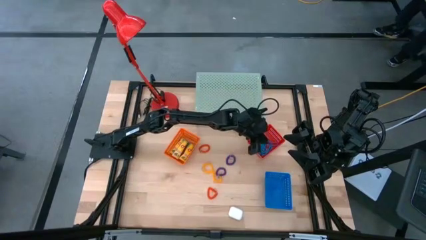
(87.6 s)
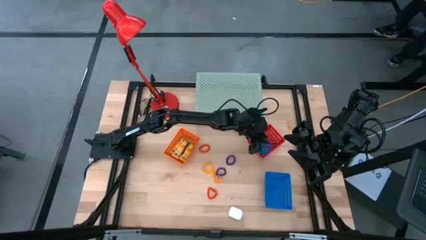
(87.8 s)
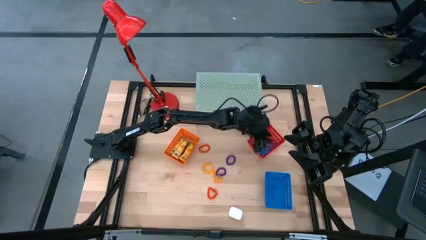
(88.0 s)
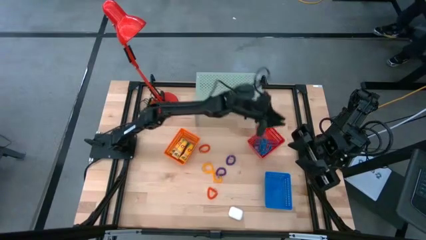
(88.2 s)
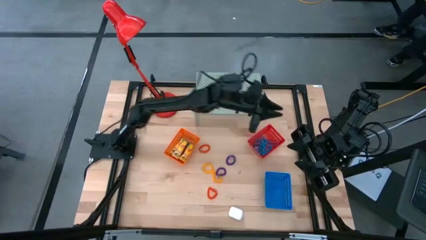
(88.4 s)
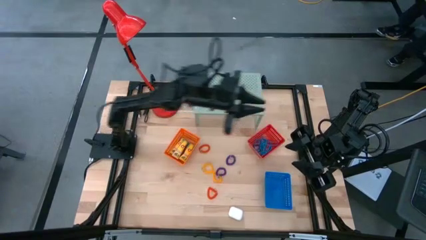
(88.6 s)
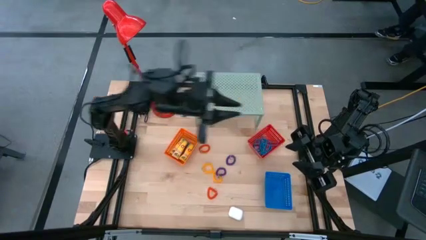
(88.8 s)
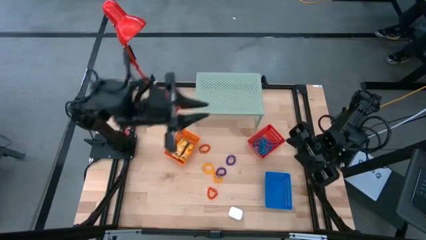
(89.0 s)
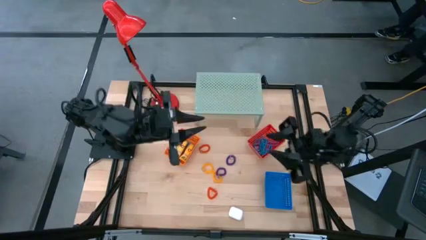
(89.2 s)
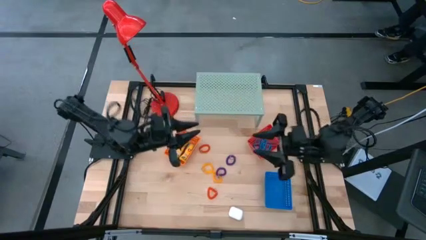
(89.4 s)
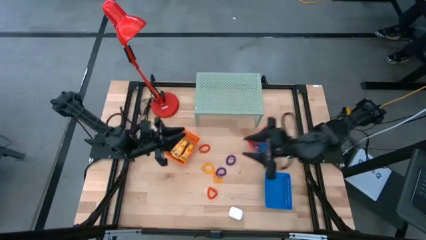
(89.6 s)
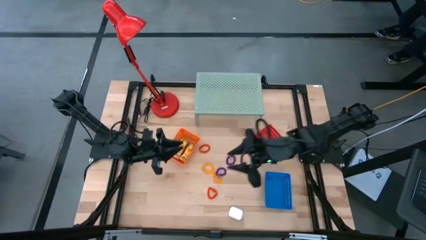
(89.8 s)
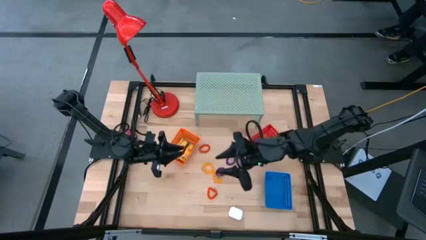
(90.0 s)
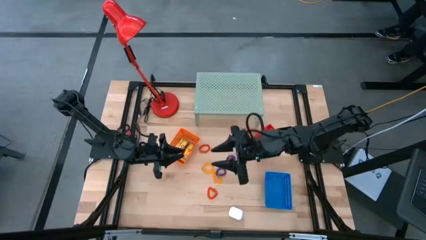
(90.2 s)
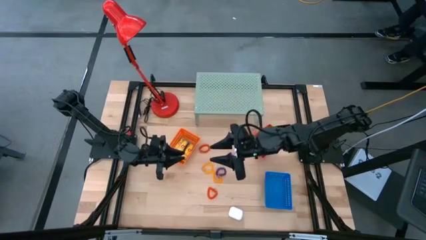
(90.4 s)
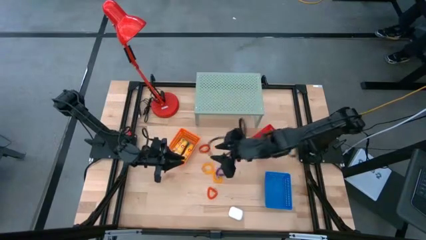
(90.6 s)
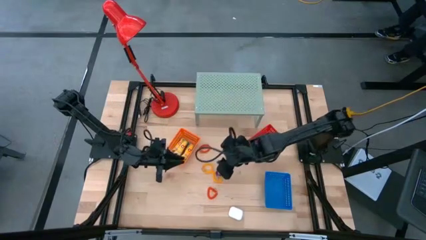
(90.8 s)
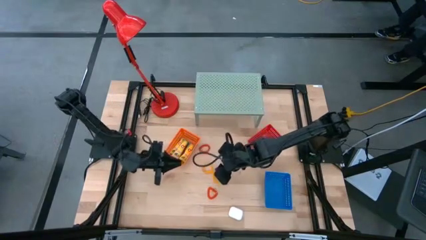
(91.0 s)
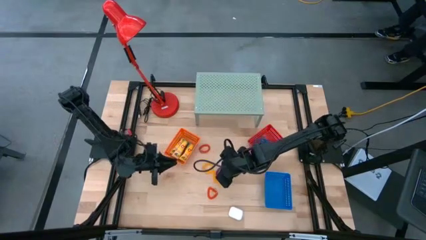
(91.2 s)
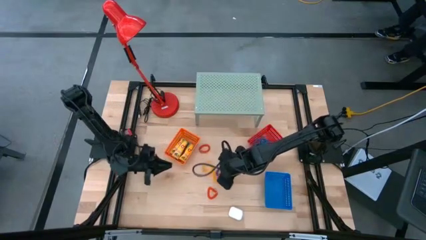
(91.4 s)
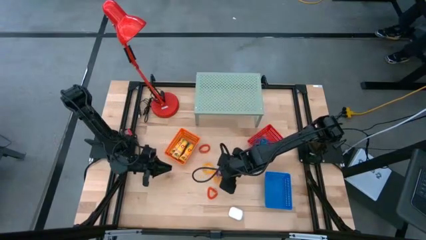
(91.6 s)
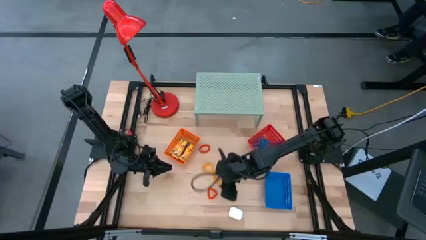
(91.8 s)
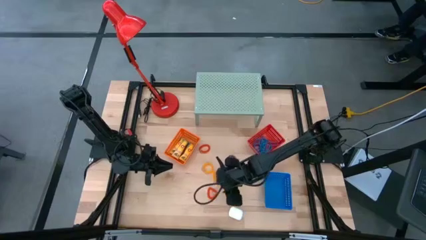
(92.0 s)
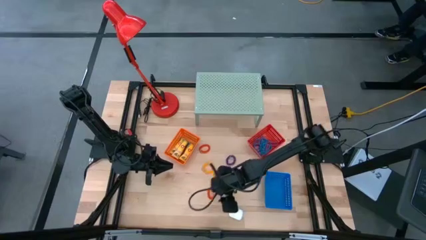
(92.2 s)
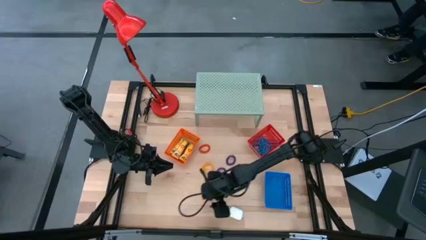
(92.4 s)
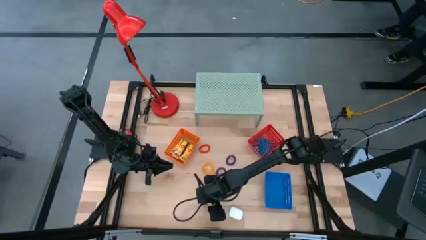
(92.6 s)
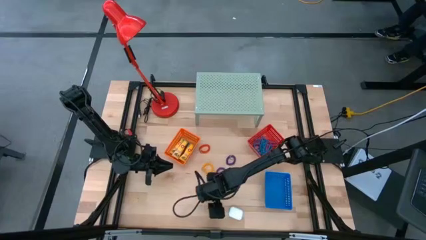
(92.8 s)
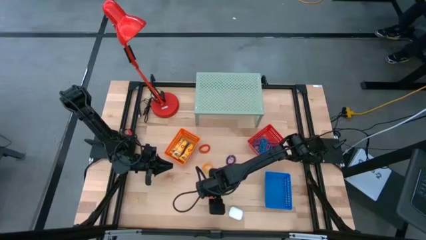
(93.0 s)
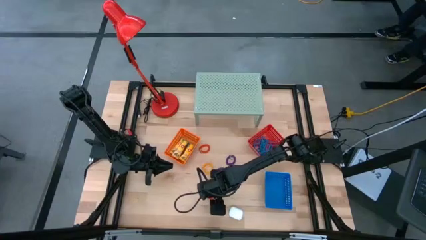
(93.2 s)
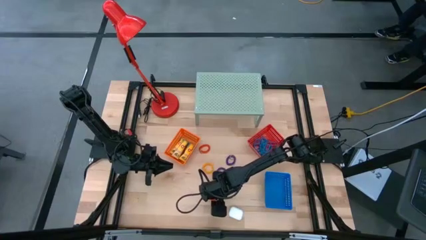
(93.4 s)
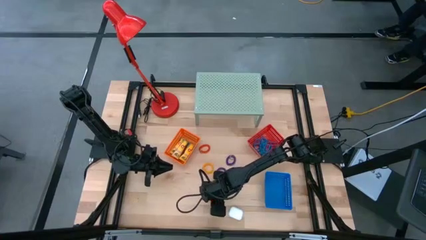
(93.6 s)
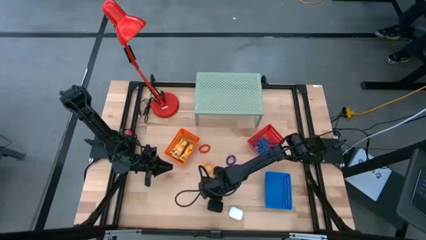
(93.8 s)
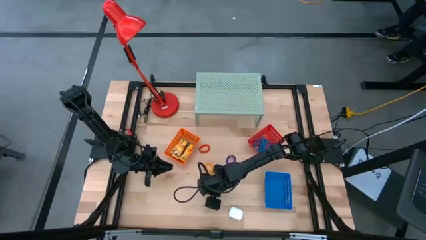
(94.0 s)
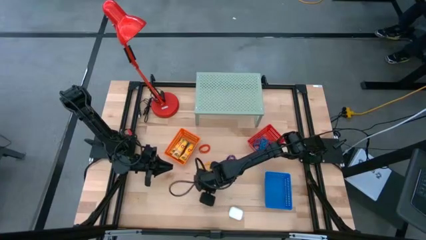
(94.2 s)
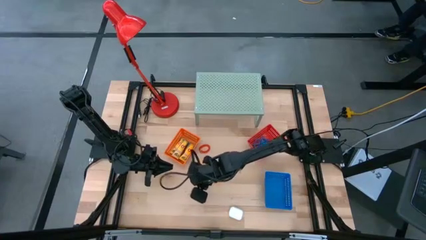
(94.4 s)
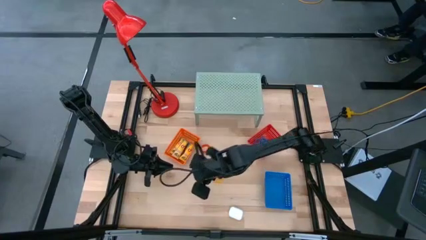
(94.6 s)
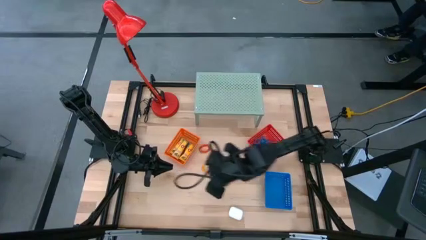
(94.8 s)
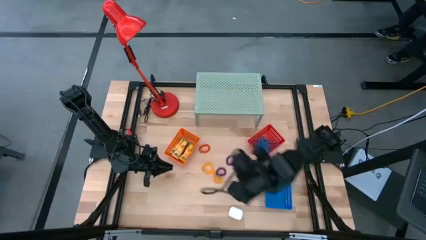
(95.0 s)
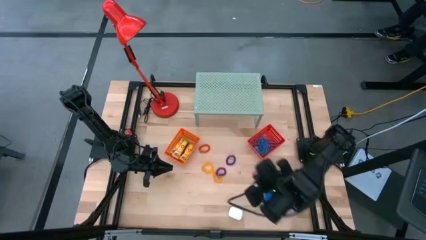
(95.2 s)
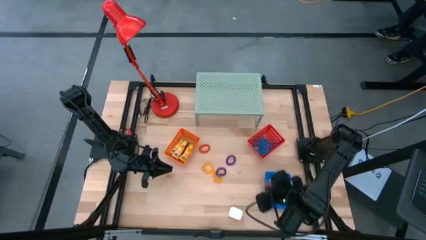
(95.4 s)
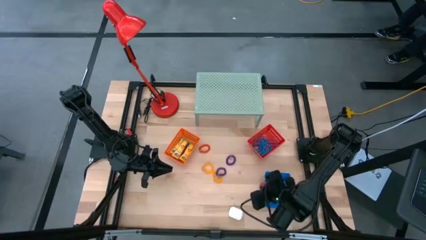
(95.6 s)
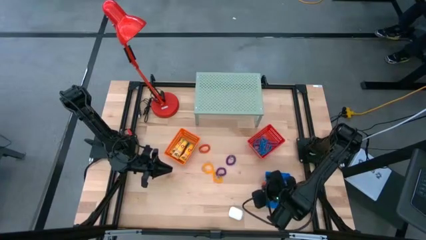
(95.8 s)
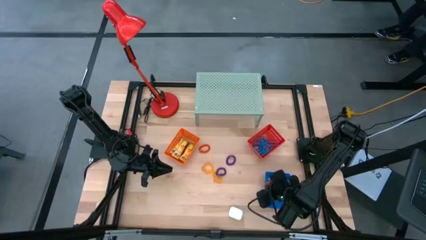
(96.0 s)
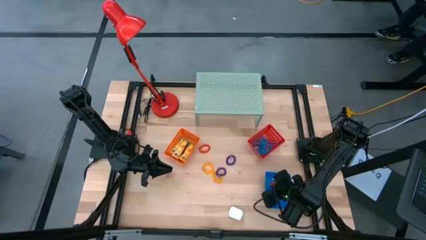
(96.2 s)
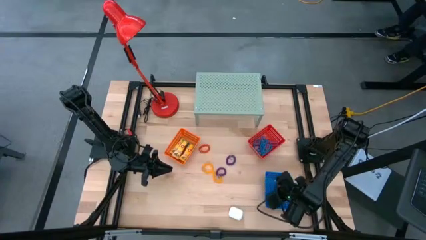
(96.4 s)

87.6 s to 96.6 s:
Task: Pick & Place Office Desk Supplies
Put the orange spring keychain into the blue bin

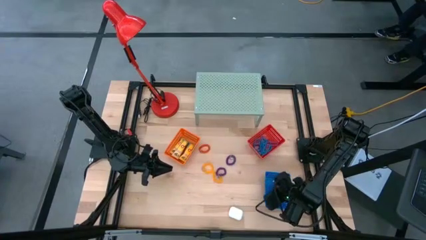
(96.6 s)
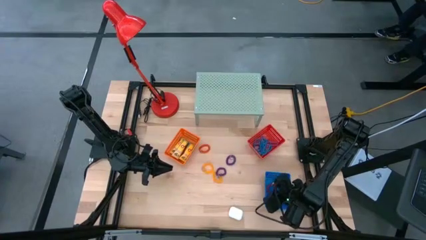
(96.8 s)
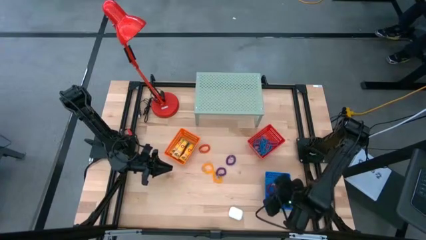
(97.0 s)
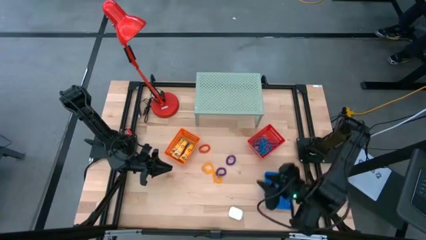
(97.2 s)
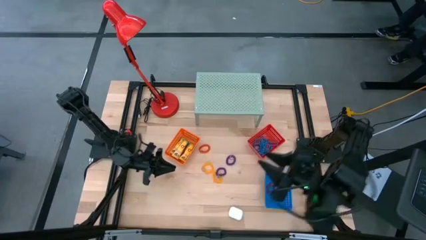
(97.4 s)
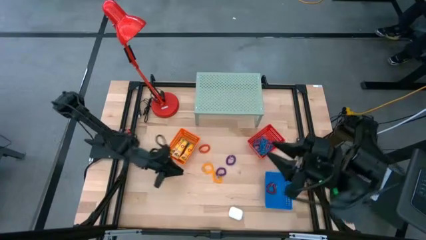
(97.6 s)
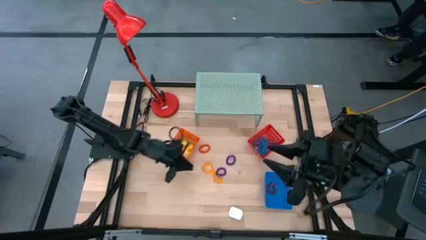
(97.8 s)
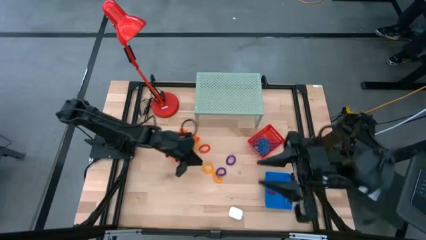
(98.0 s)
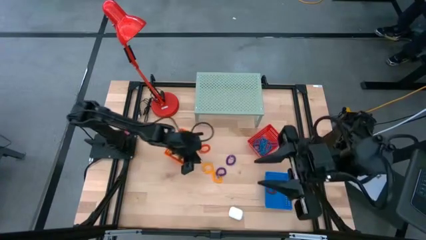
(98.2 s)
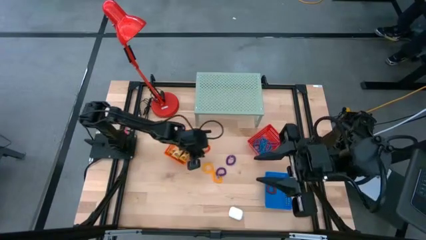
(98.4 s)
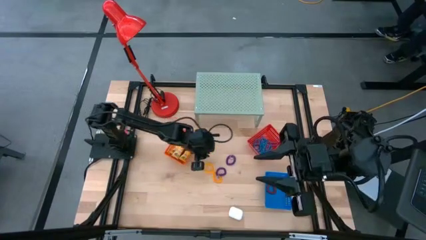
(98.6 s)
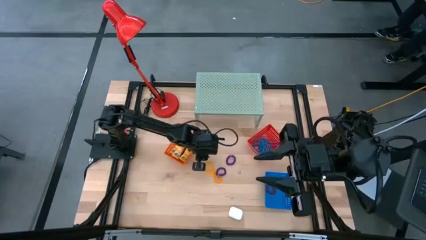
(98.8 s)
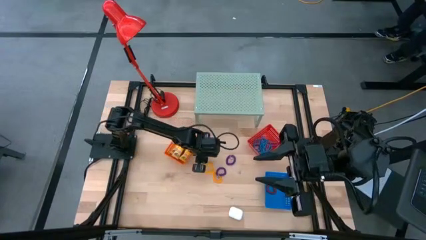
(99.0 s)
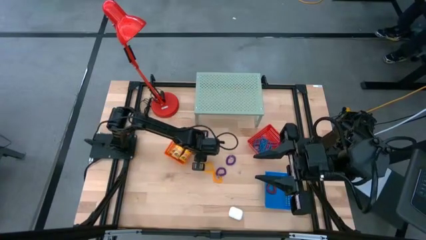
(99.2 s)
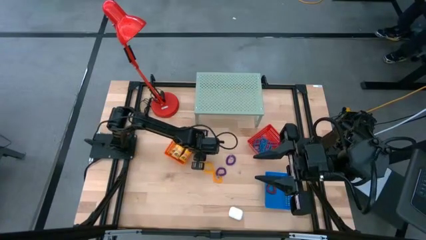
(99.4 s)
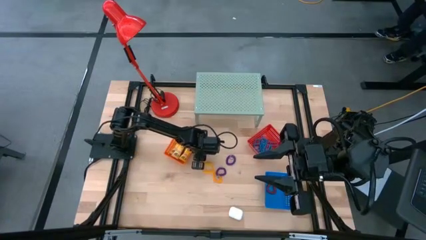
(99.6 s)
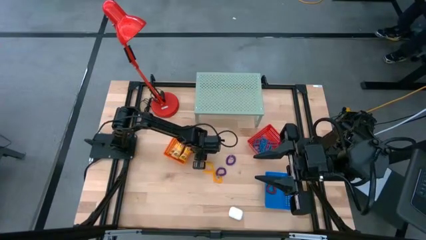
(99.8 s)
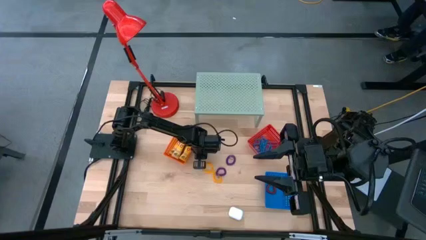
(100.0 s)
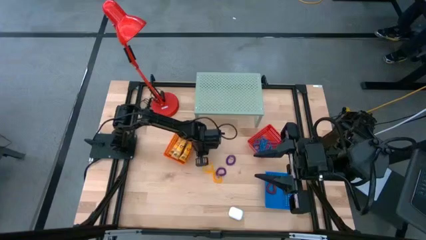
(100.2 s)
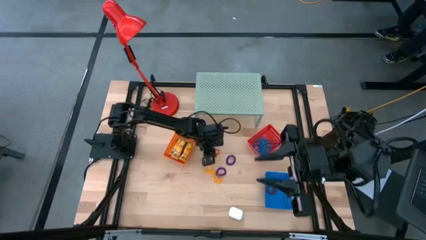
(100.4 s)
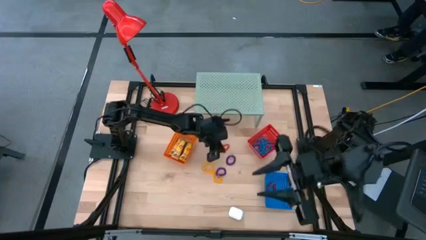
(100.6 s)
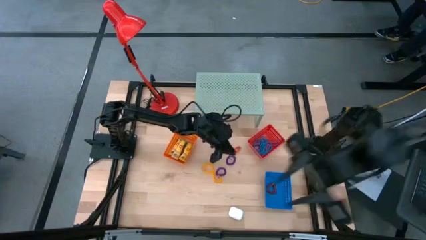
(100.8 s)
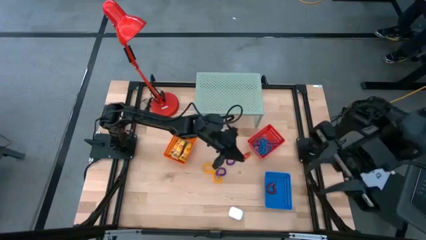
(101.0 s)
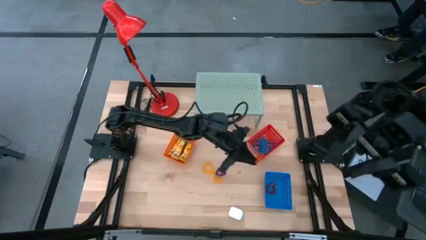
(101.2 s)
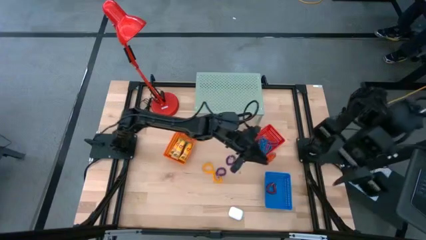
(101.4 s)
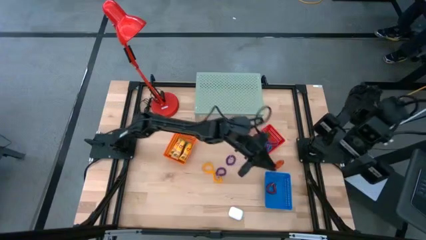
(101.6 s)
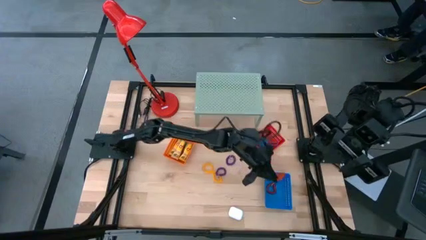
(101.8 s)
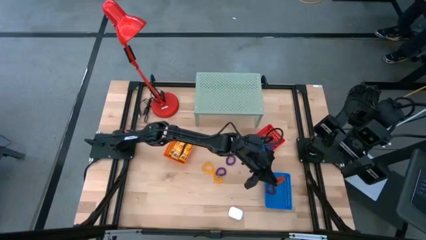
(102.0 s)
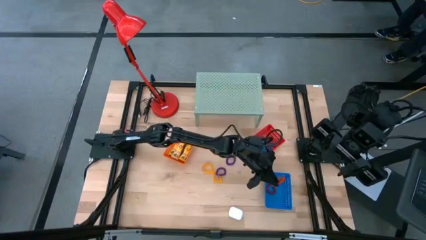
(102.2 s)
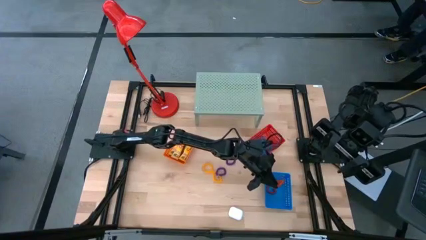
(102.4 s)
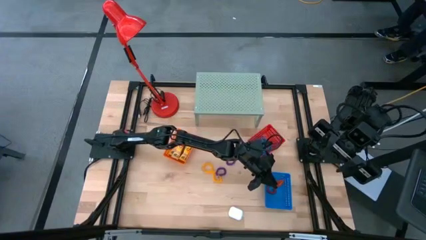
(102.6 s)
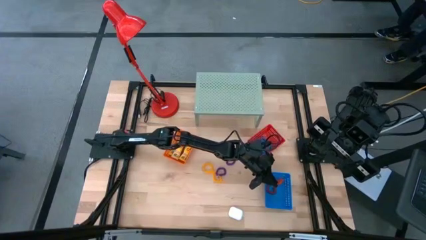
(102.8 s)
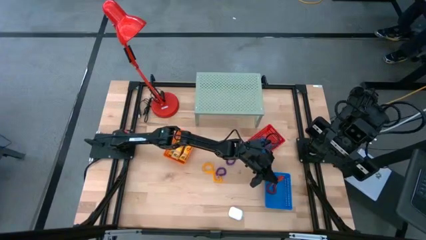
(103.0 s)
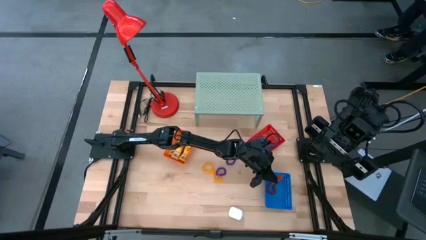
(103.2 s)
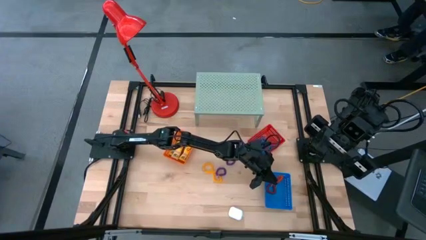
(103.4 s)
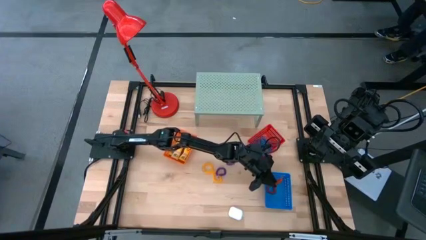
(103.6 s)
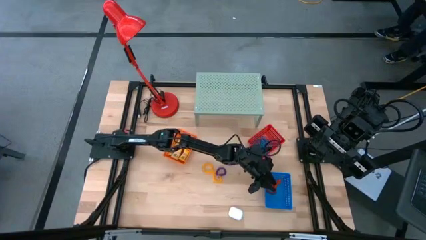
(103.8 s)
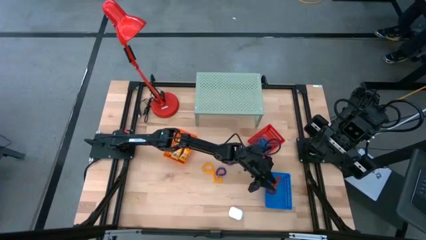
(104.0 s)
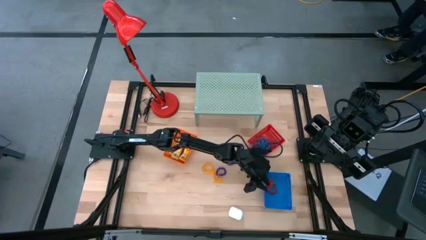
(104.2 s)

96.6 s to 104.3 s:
Put the orange spring keychain into the blue bin
